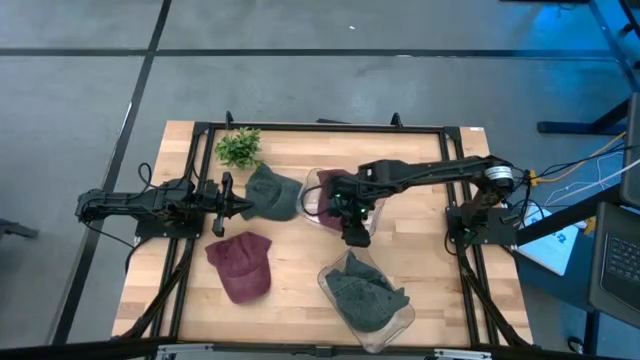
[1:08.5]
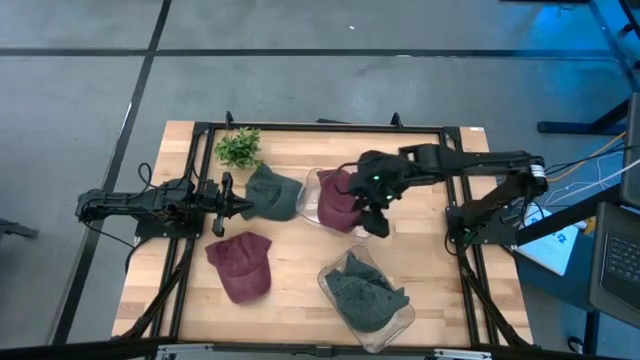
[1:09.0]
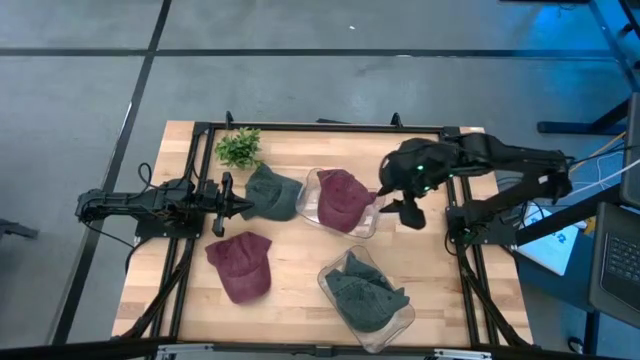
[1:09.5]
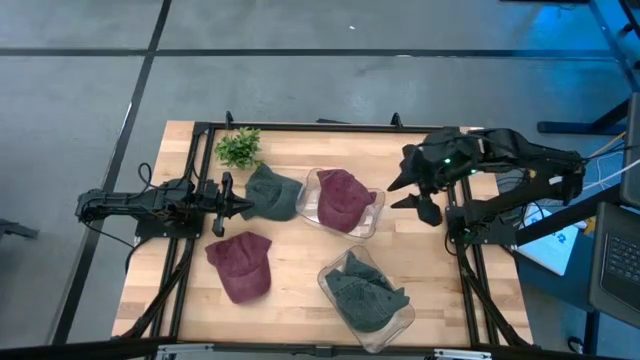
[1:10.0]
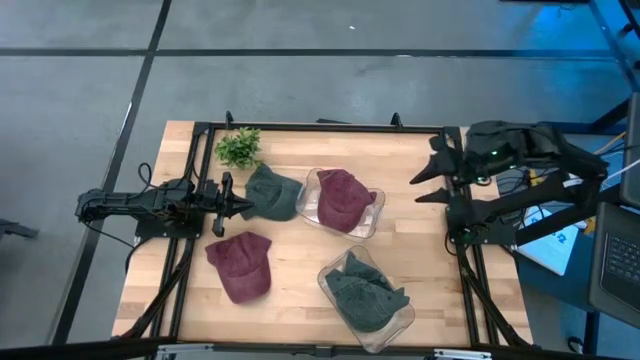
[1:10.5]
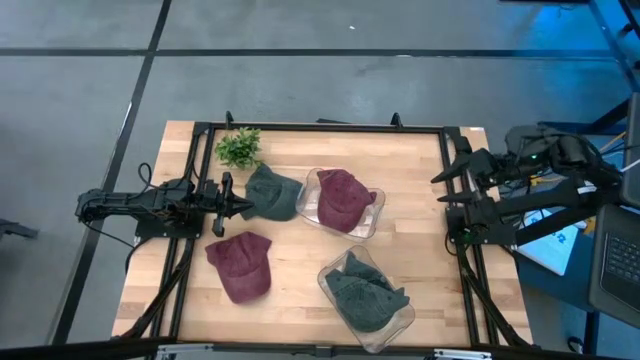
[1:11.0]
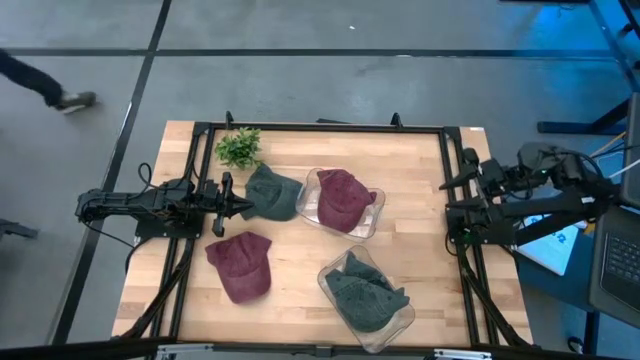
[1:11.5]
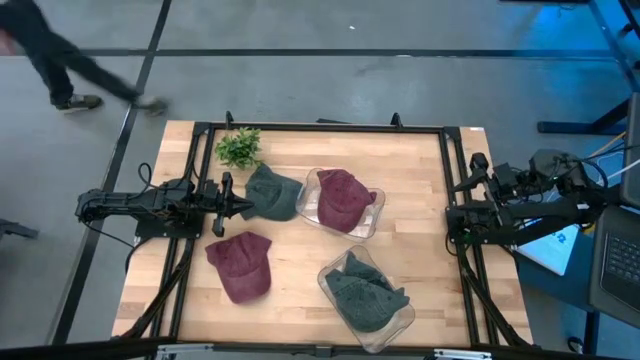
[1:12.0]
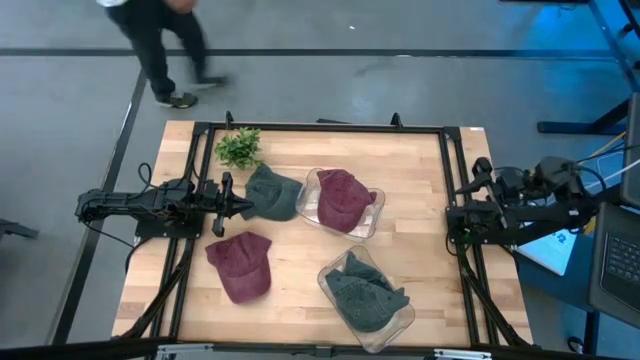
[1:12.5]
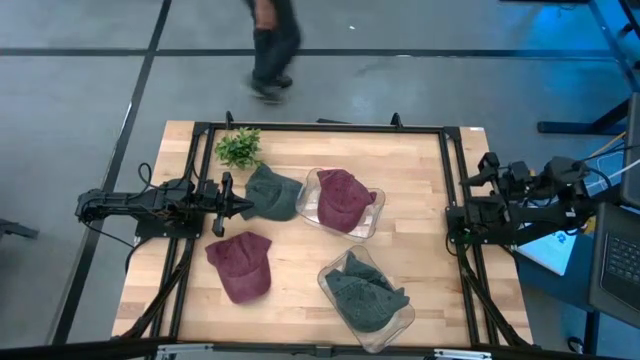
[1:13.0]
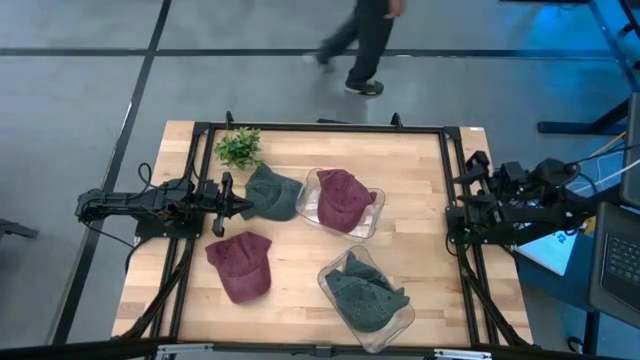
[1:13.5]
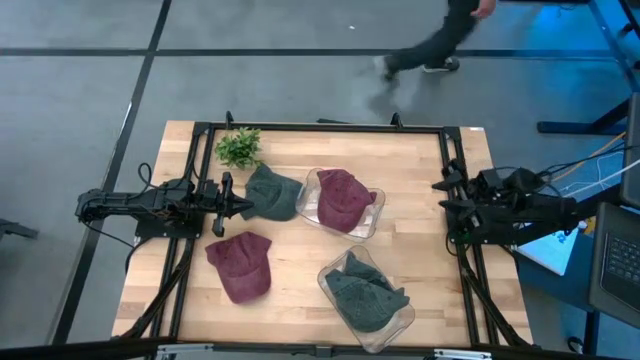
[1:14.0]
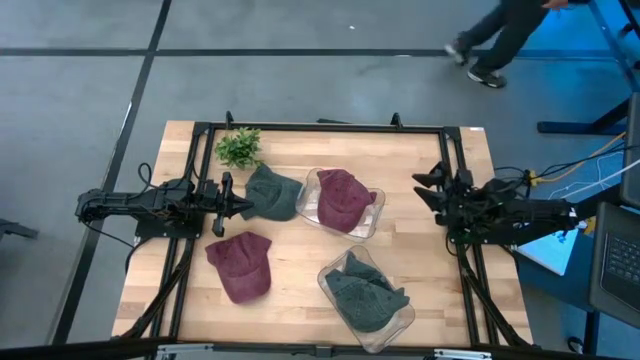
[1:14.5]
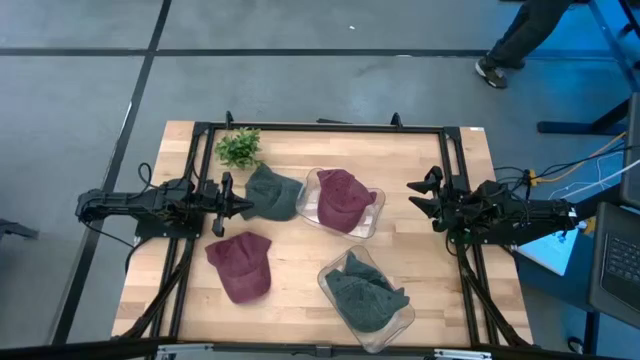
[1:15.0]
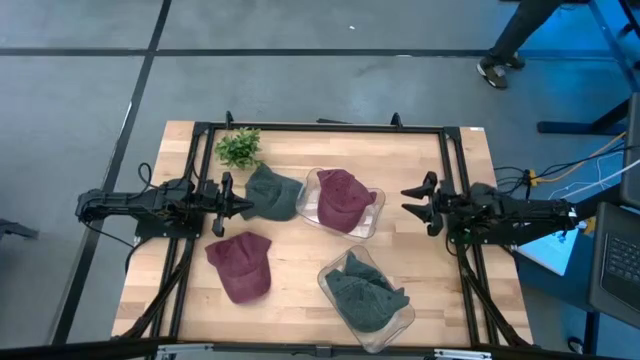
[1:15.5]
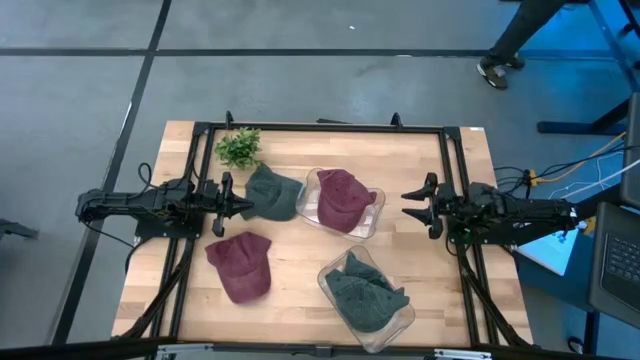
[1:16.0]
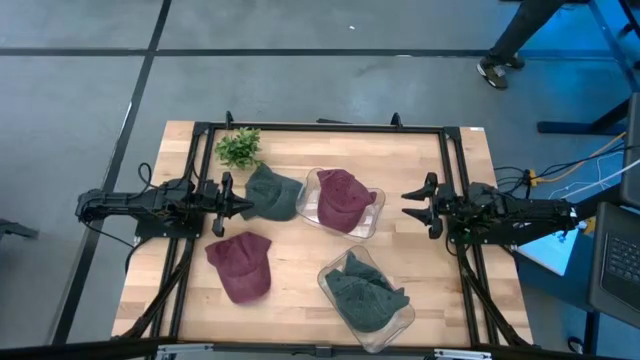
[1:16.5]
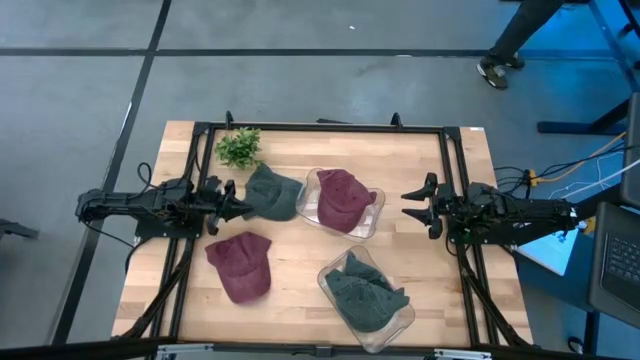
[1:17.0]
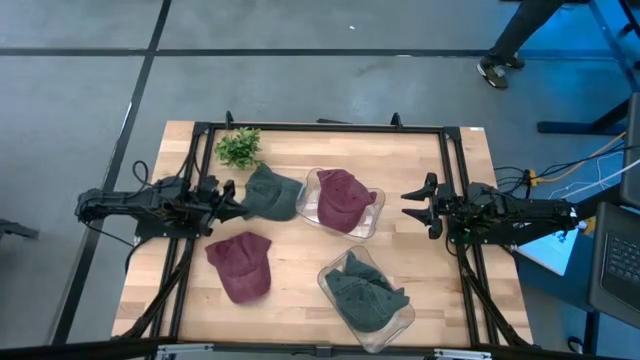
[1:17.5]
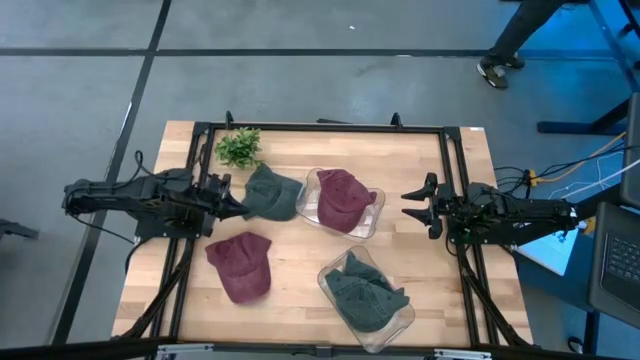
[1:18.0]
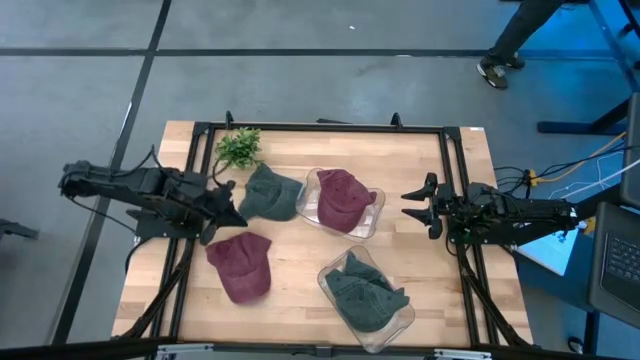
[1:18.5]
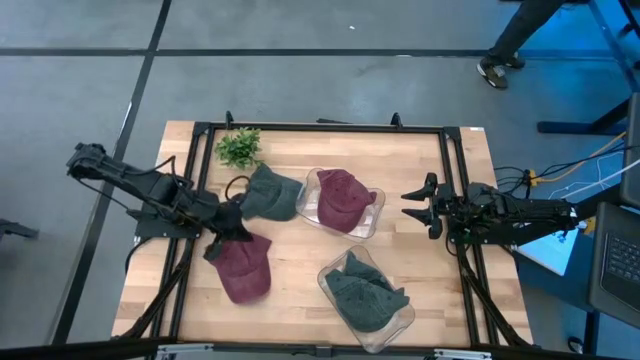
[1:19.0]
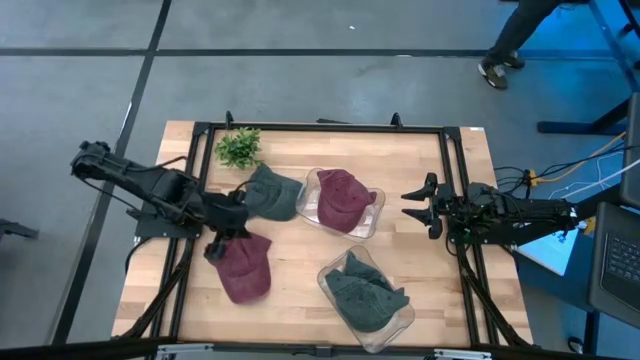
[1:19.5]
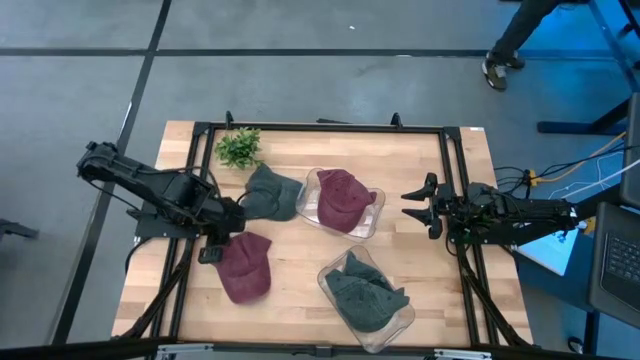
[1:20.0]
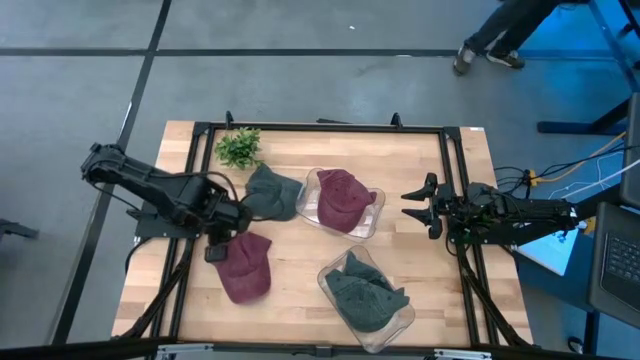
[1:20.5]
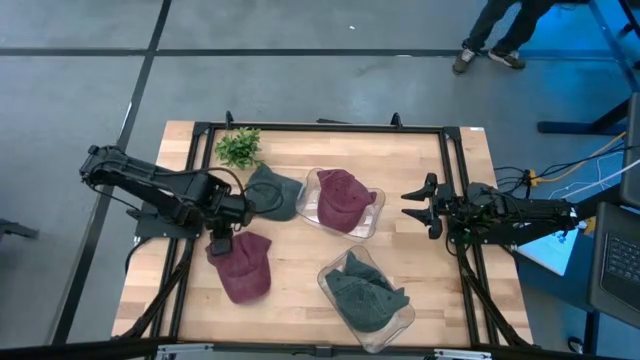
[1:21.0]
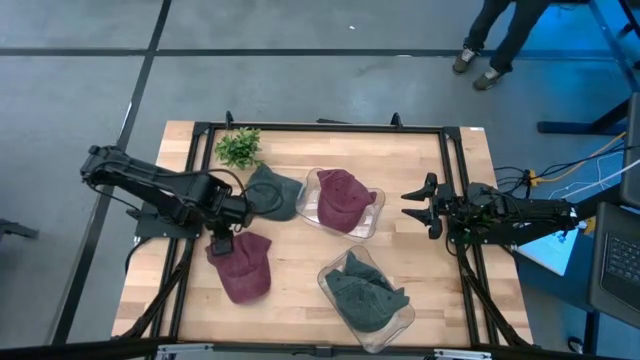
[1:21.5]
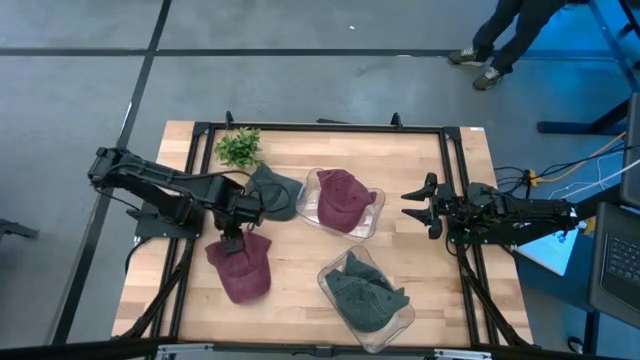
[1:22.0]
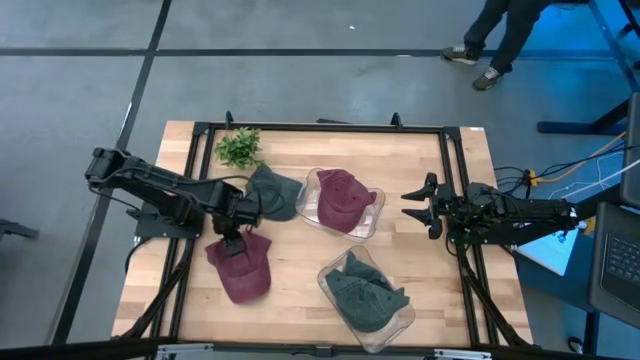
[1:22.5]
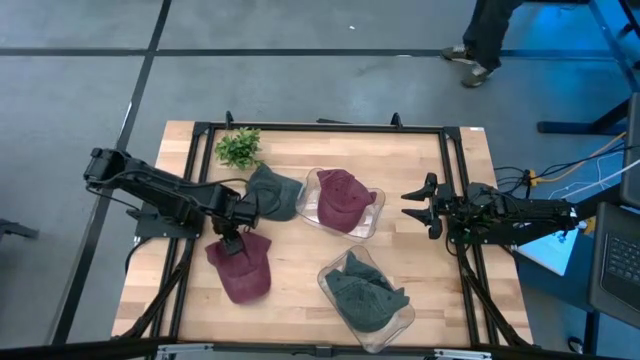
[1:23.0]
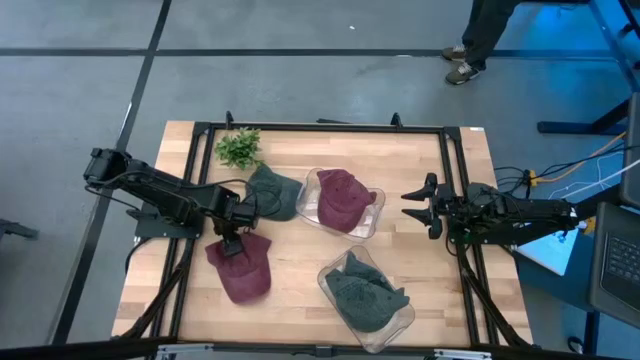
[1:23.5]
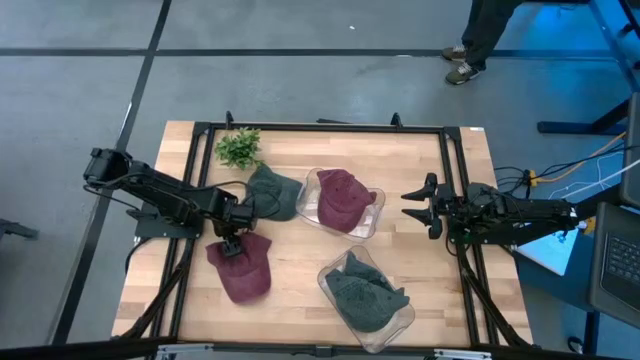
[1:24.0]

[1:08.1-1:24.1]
Task: Pick & Place hat
Put the red cap into the top transparent bin

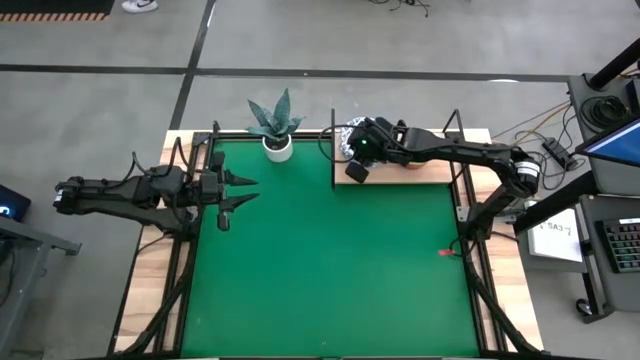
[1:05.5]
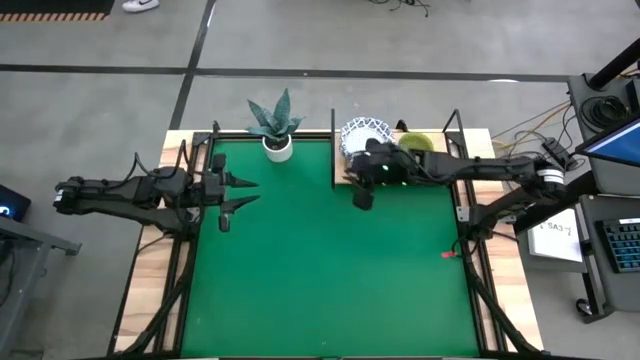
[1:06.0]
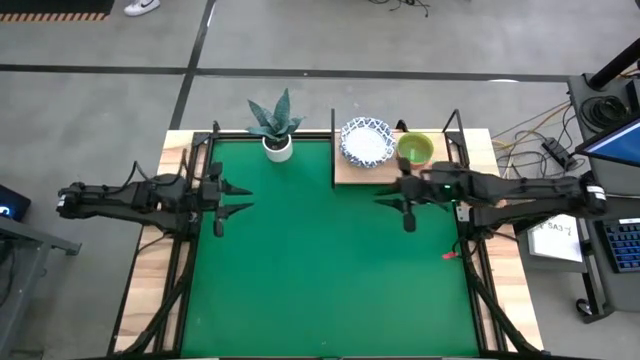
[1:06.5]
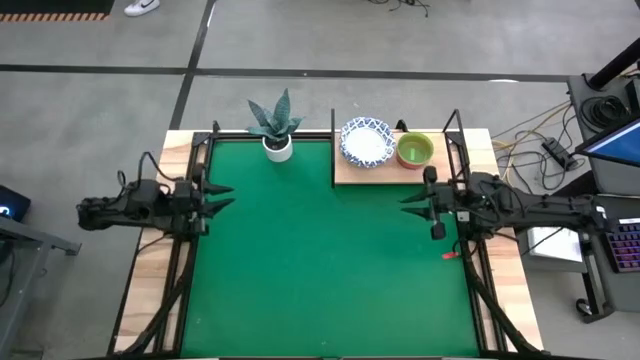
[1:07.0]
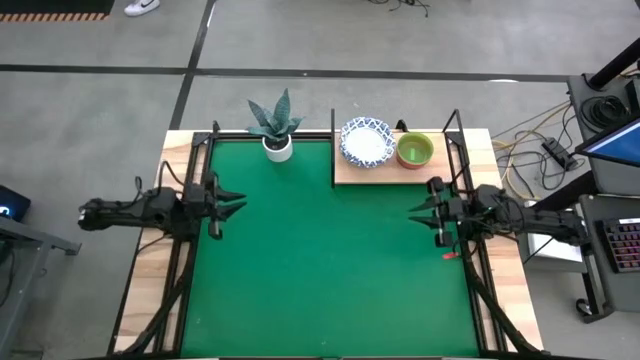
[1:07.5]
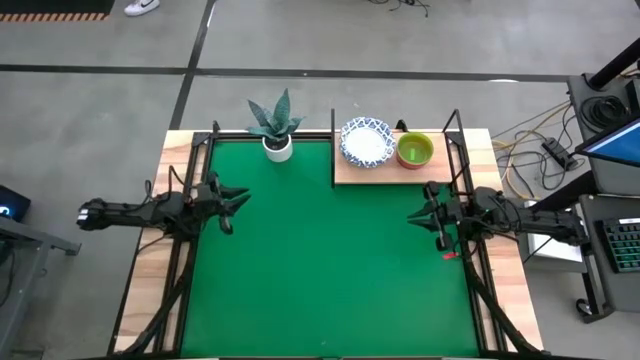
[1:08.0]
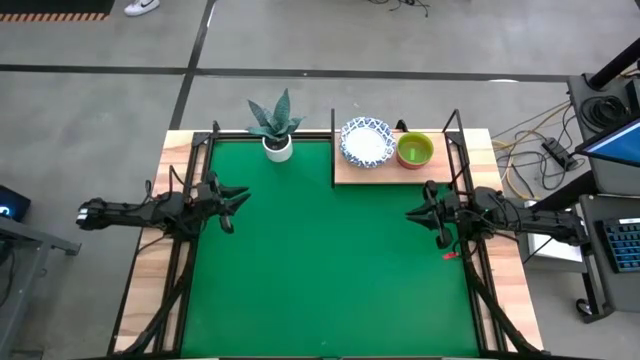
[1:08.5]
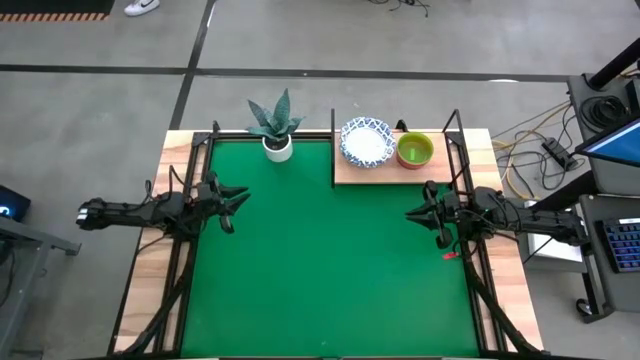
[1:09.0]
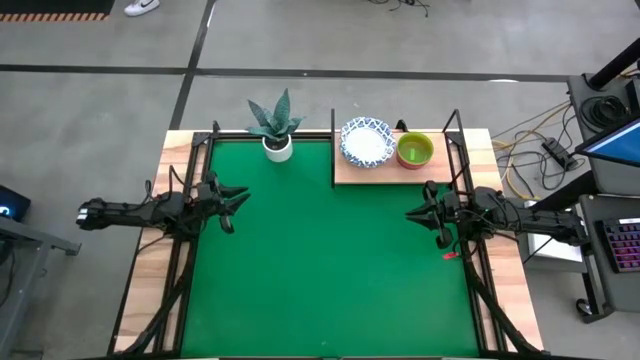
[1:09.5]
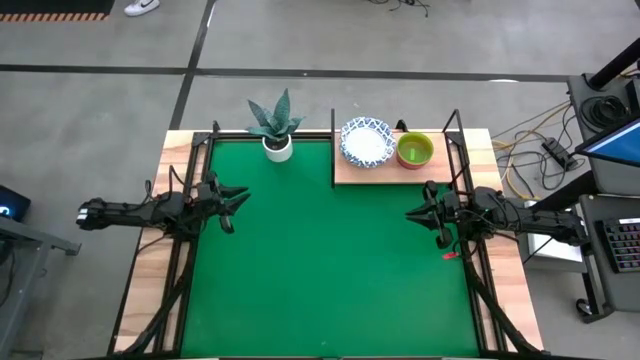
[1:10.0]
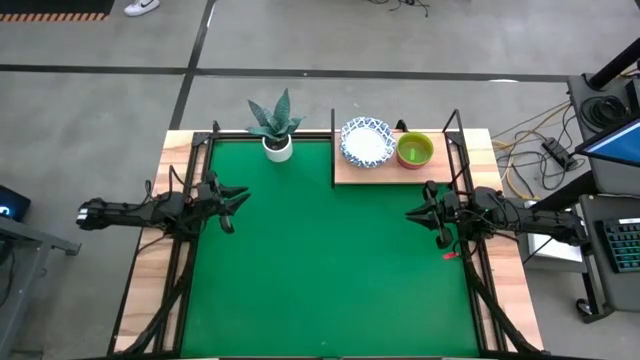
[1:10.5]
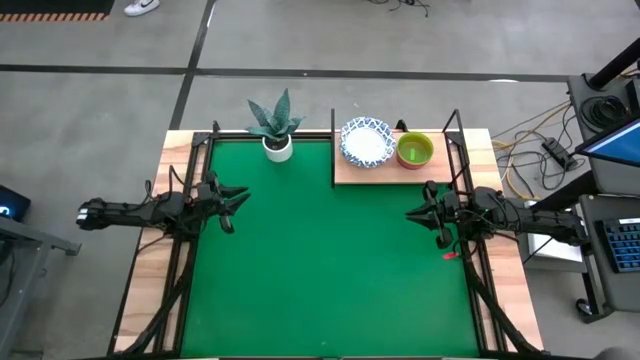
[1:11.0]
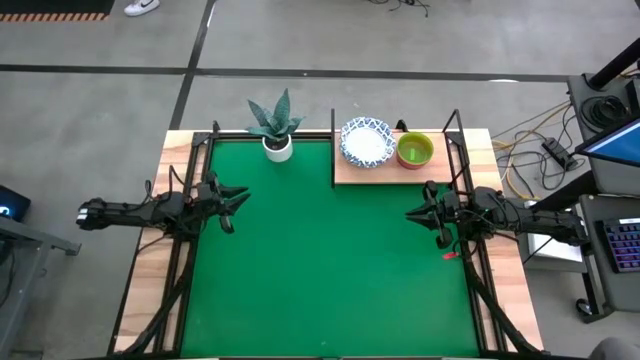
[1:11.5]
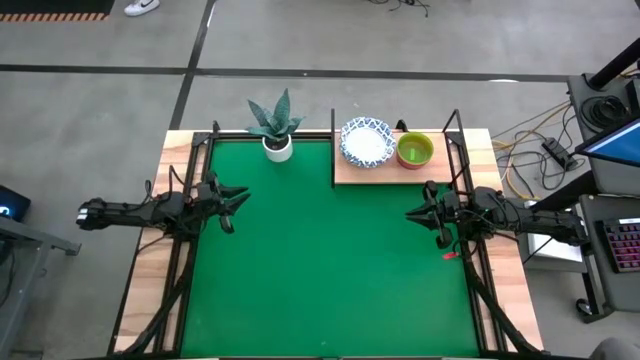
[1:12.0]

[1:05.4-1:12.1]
Task: Place and stack bowls onto a shelf
Return to Home Position
